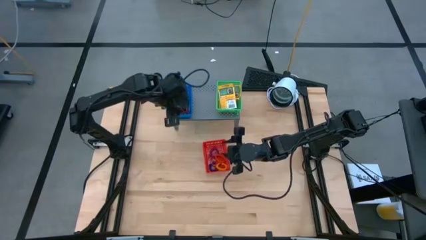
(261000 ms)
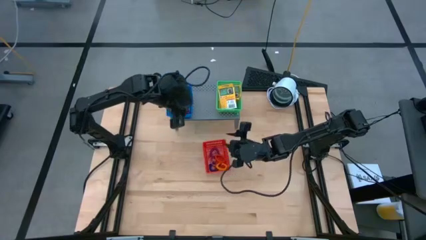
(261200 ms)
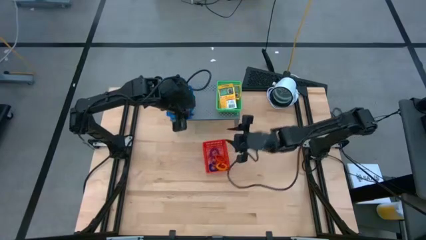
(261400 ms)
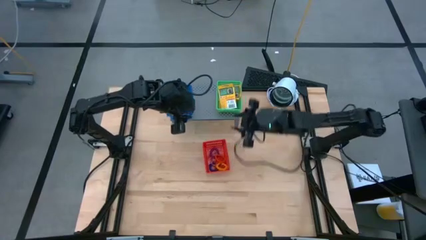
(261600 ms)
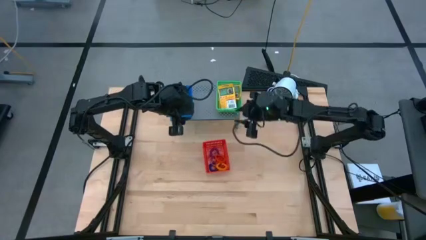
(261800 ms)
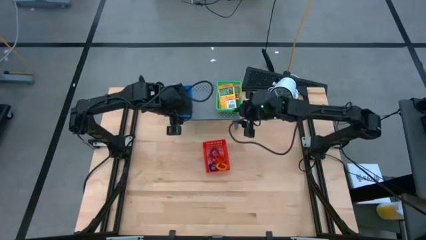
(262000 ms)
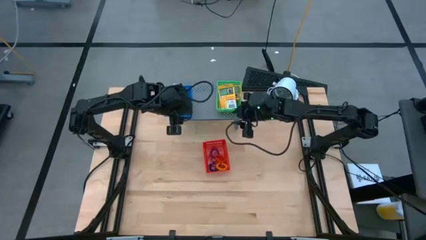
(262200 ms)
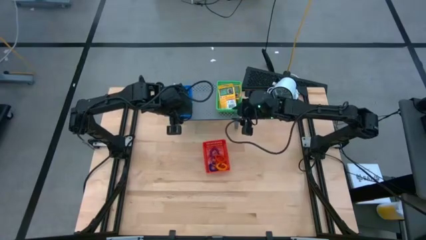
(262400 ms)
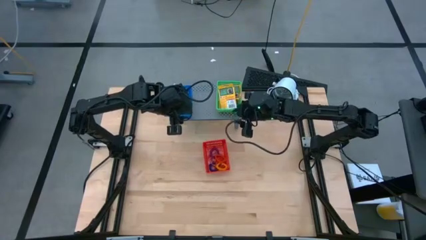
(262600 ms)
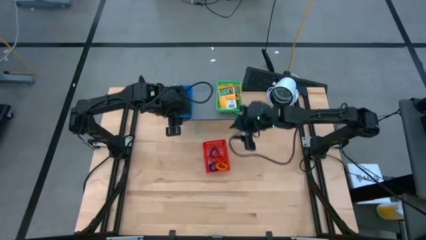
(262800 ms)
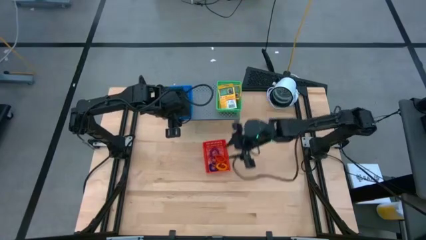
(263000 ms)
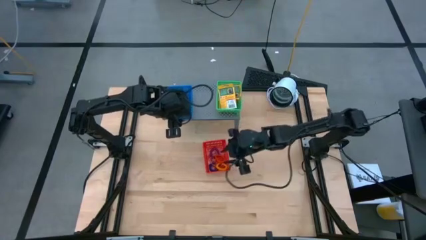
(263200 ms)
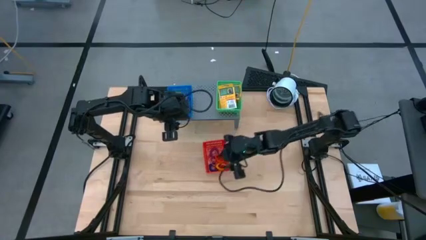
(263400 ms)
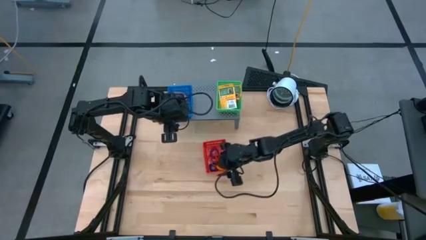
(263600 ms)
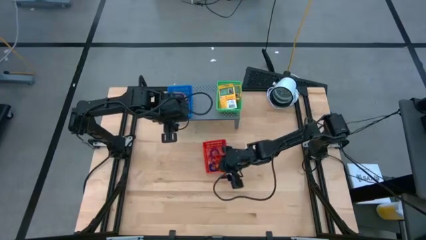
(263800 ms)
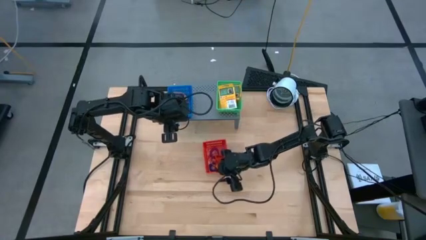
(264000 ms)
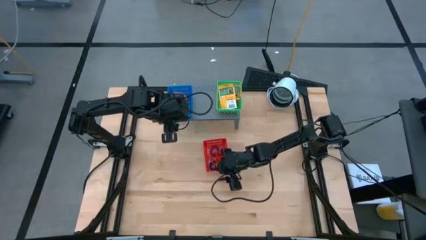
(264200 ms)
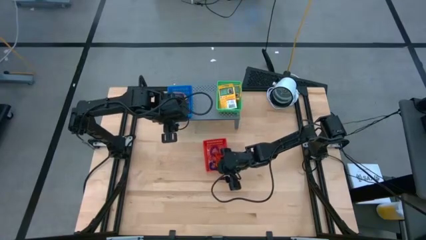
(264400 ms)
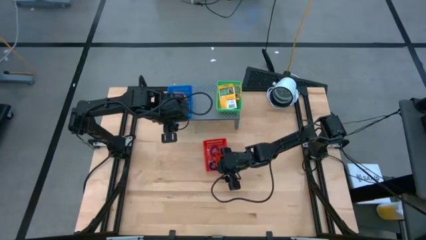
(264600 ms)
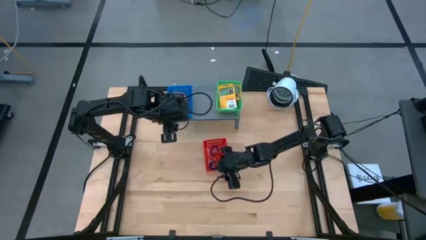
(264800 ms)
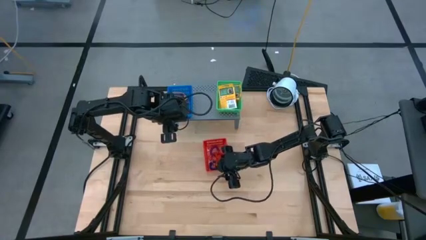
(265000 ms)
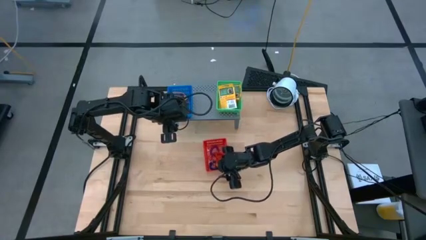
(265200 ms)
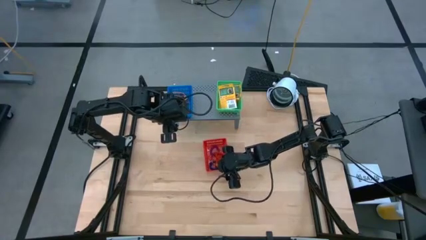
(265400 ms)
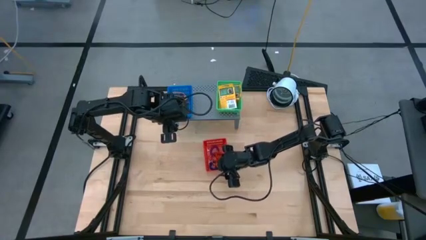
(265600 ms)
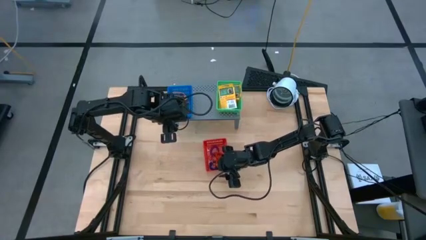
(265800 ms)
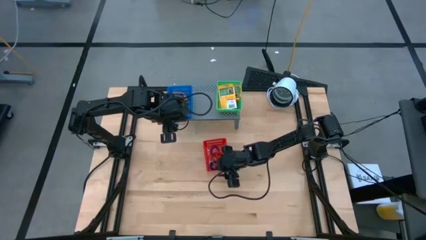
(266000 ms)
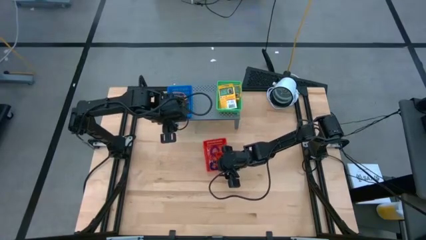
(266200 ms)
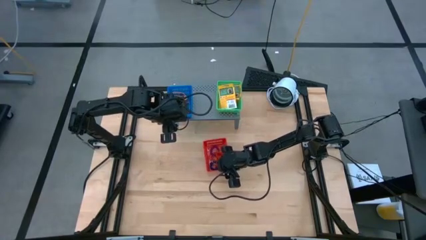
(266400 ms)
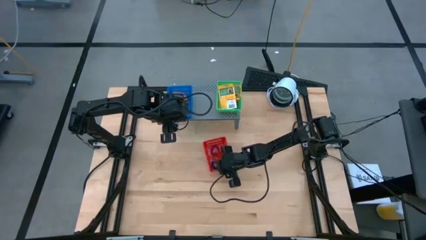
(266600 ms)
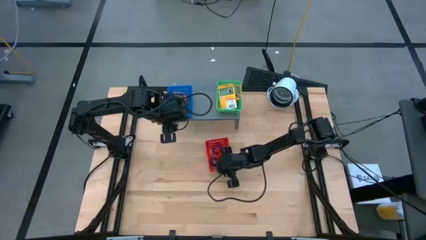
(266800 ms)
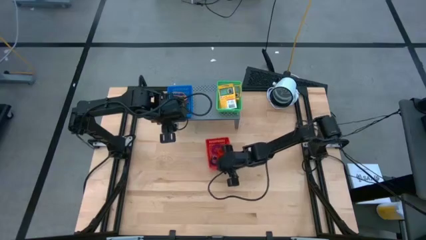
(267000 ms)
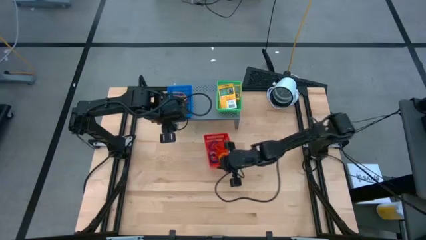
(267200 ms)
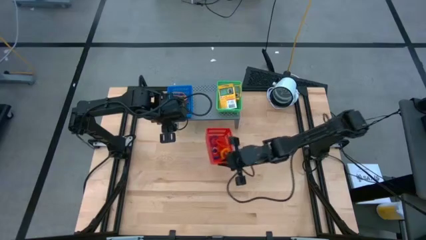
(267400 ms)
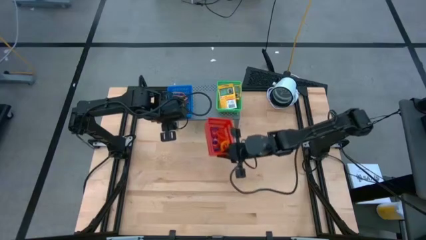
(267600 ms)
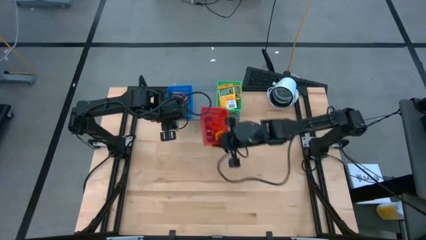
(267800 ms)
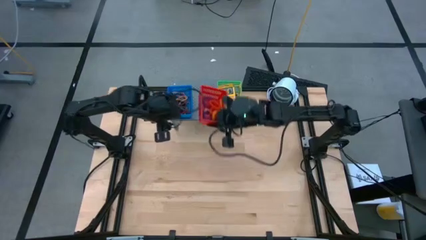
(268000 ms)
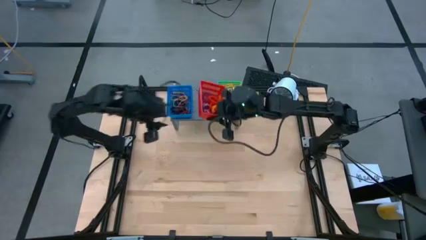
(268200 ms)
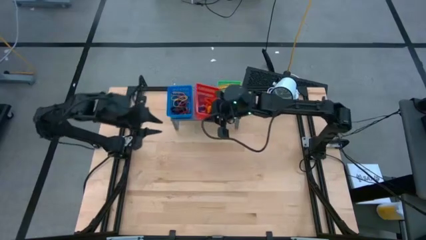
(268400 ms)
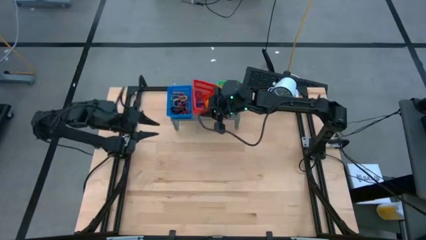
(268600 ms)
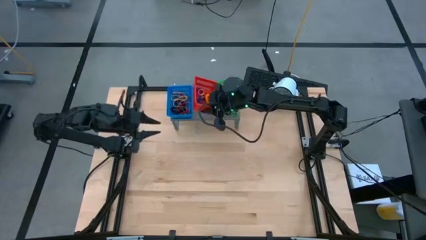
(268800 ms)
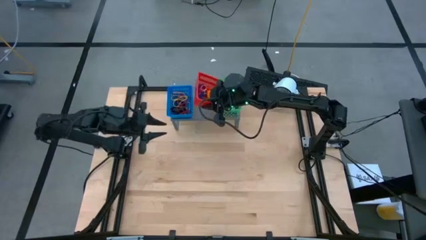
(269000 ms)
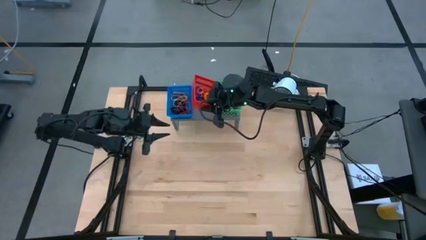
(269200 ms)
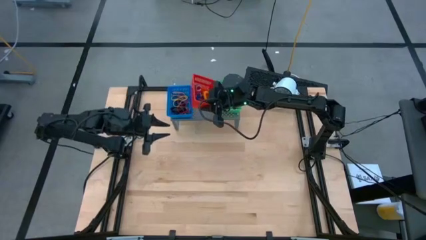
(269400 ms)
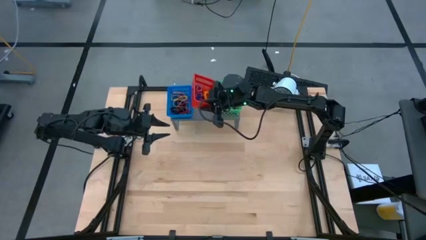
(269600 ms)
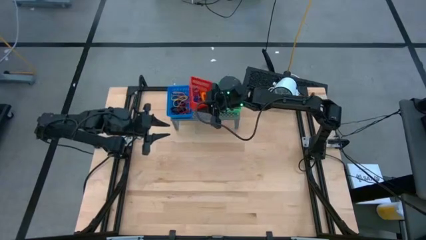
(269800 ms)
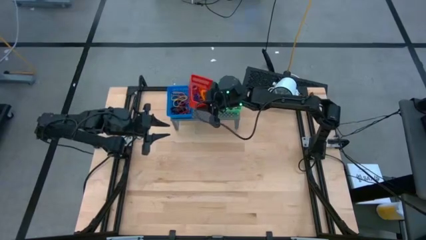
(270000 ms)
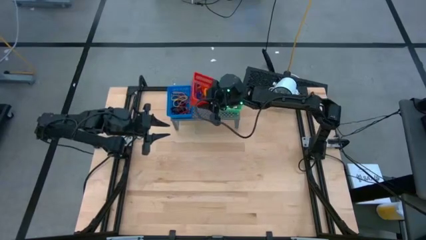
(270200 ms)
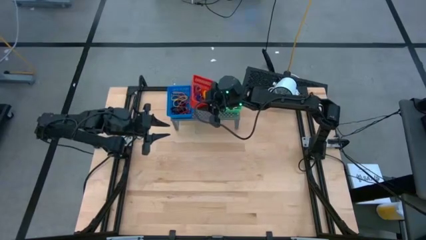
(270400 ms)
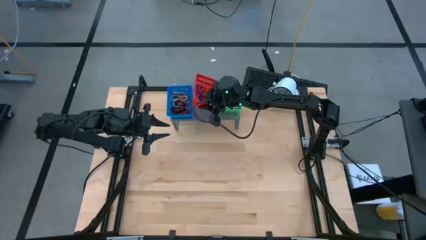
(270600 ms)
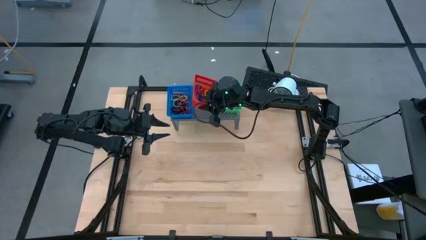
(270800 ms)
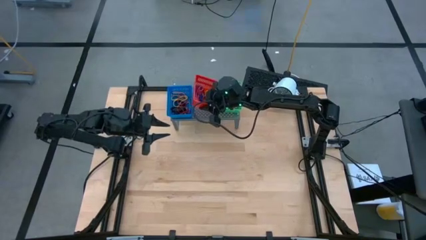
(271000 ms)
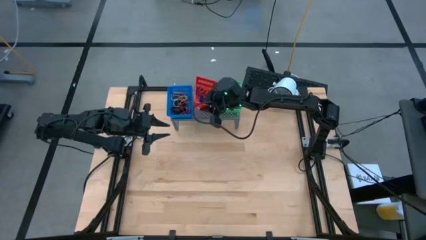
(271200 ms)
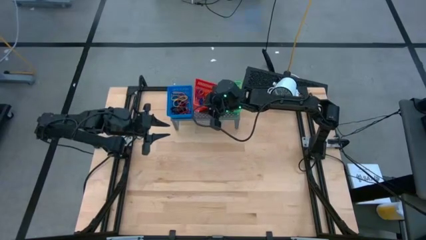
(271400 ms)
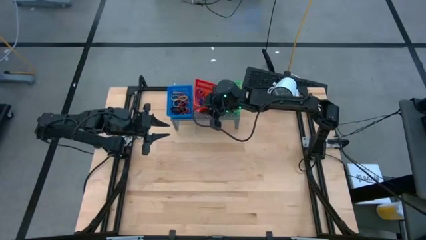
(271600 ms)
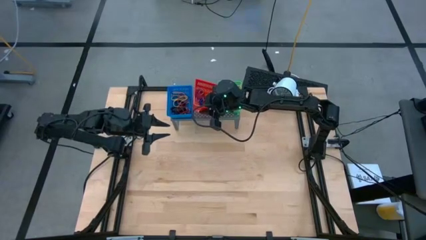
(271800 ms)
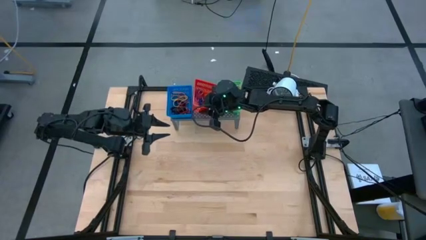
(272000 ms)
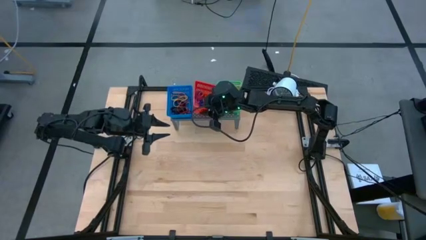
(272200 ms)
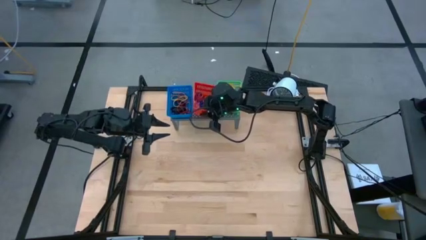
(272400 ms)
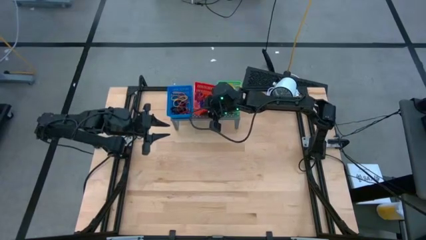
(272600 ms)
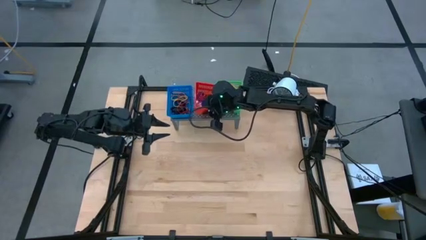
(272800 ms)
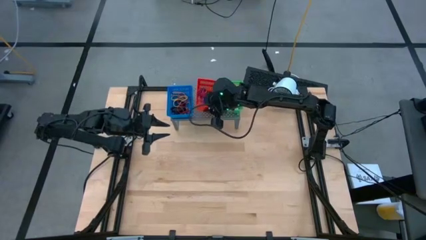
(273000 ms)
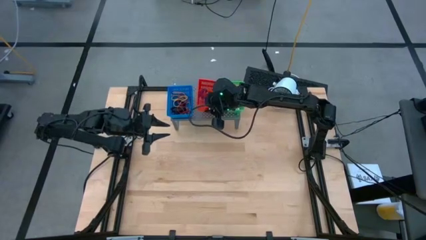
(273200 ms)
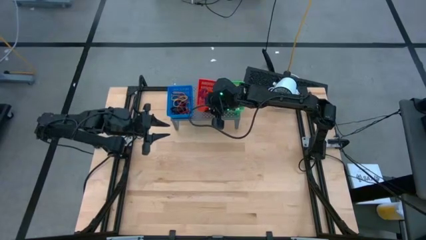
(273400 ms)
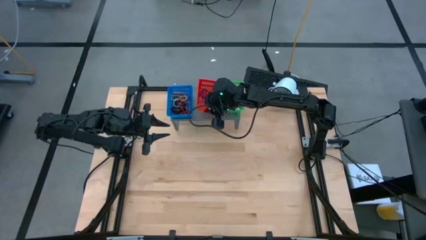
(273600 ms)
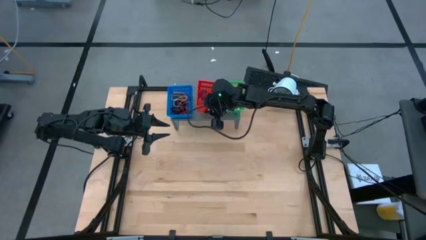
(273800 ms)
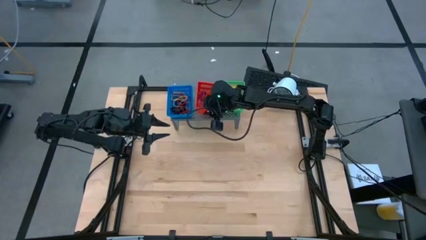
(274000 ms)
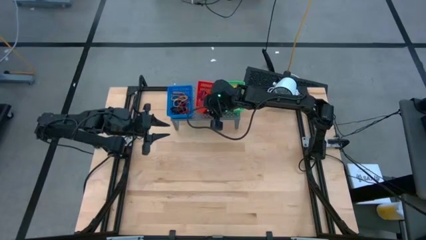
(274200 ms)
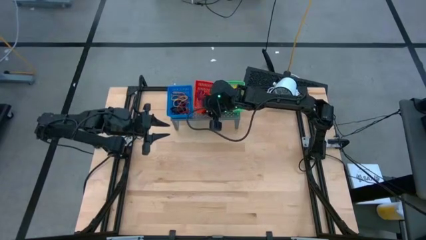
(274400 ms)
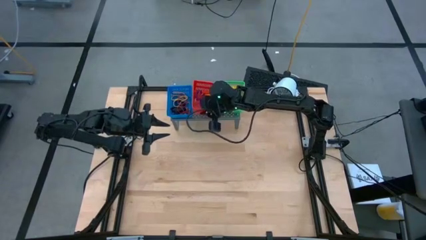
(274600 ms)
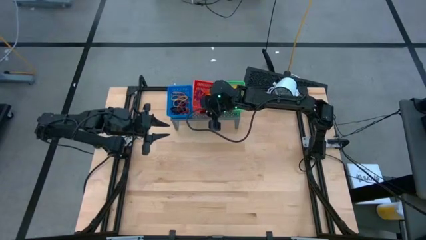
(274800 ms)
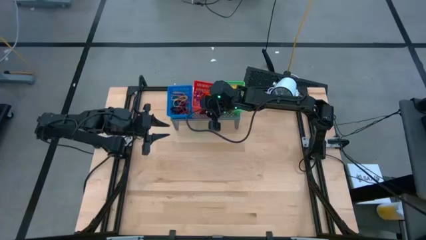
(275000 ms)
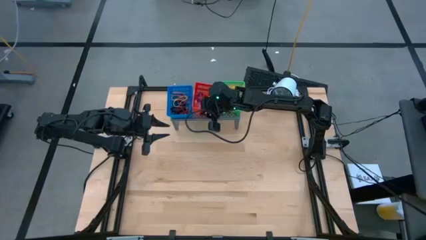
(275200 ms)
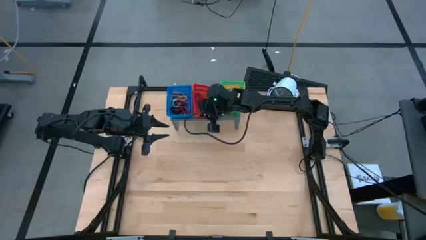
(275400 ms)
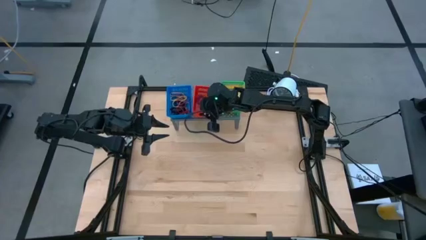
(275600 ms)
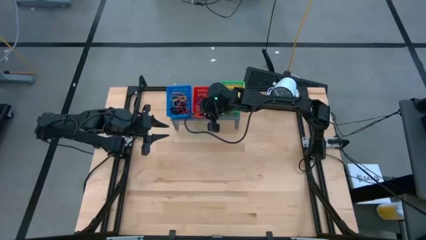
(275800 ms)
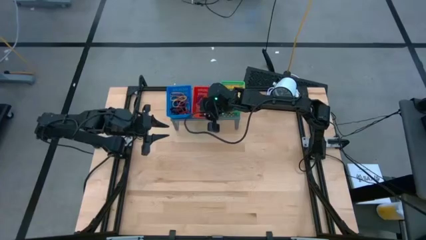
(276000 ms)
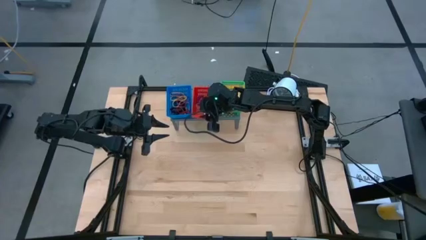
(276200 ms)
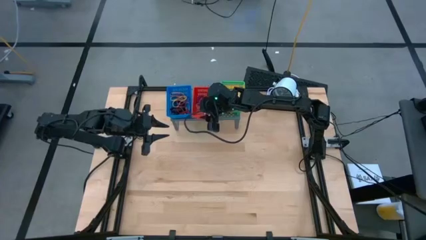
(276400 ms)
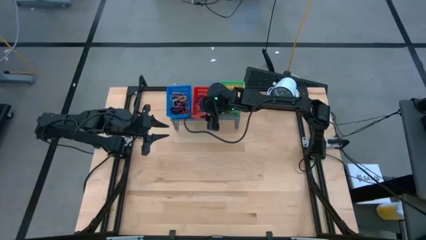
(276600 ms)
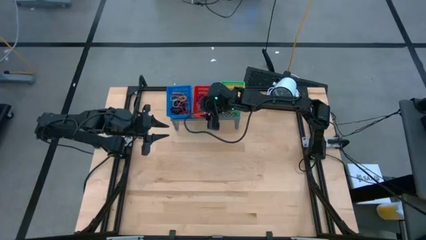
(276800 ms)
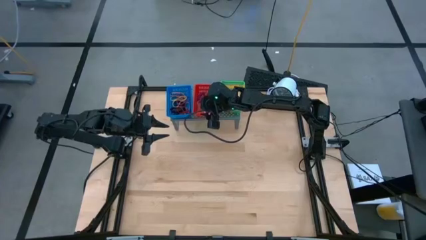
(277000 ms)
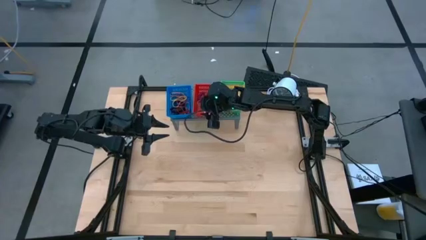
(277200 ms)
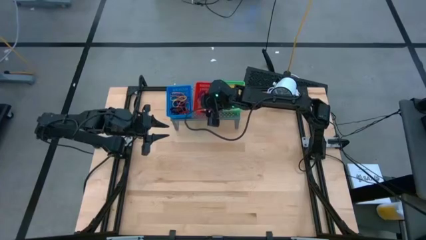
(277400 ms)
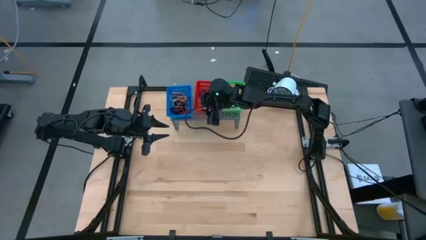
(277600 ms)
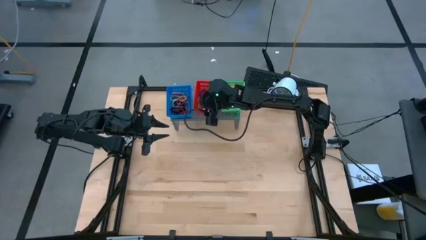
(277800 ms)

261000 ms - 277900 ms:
Task: Pick & Place Office Desk Supplies
Put the red basket on the shelf
